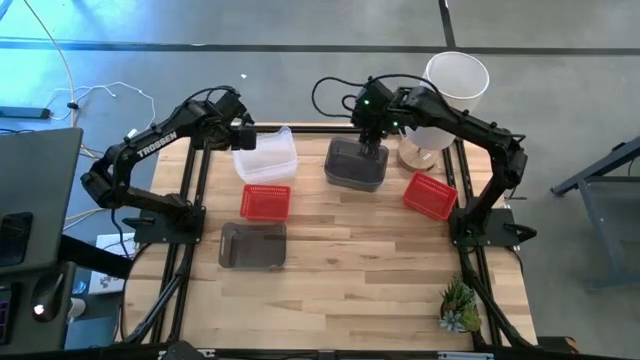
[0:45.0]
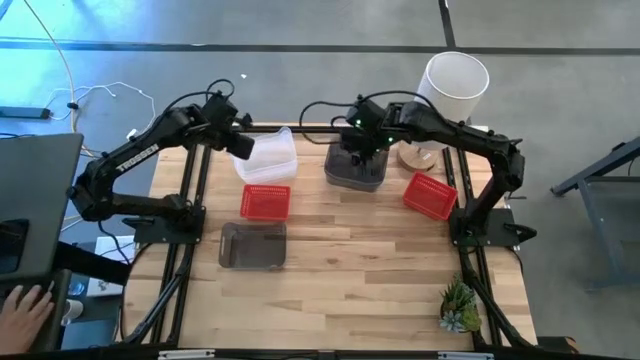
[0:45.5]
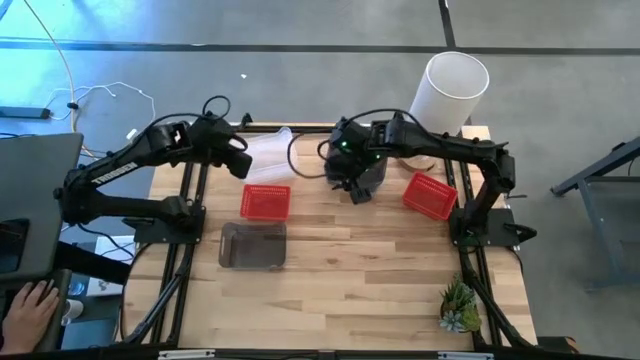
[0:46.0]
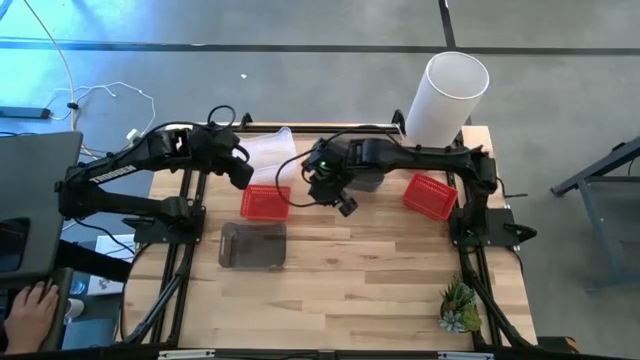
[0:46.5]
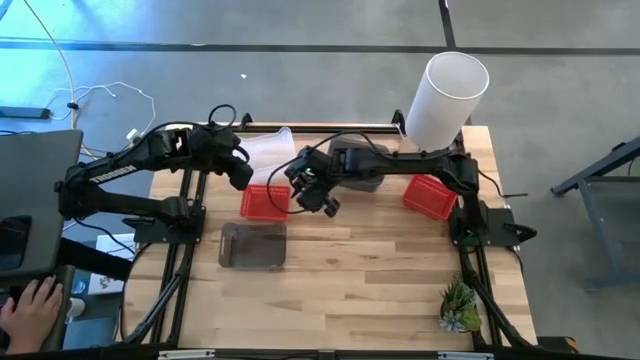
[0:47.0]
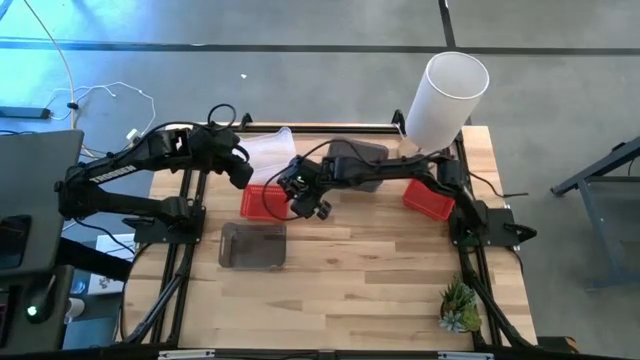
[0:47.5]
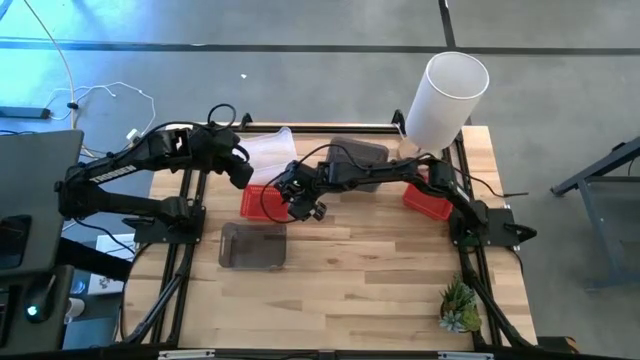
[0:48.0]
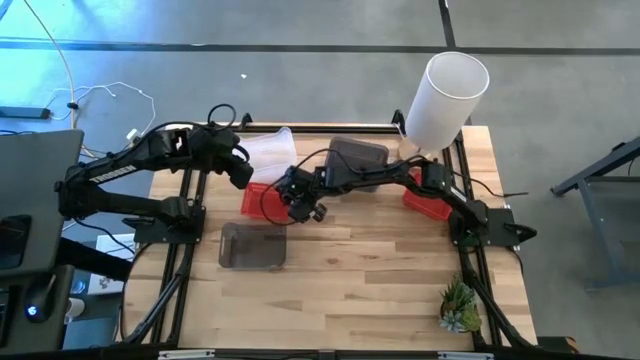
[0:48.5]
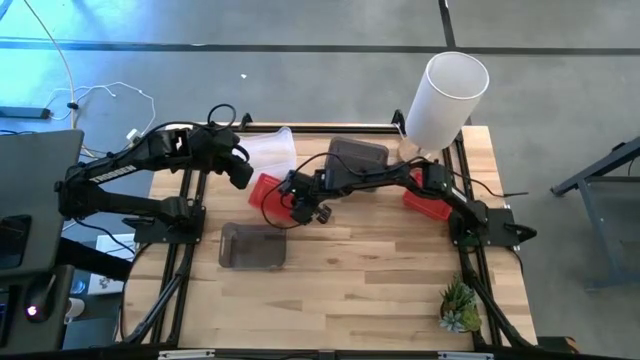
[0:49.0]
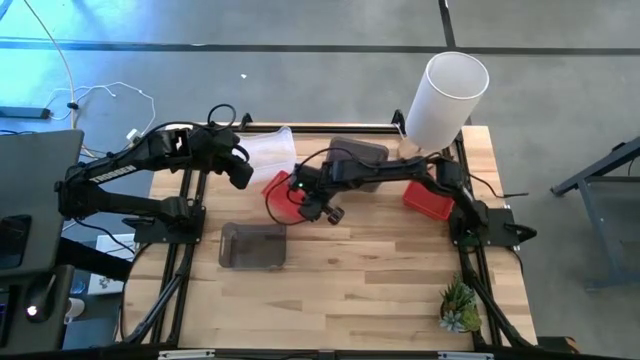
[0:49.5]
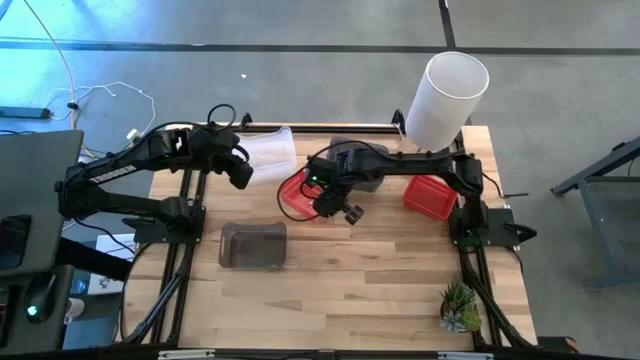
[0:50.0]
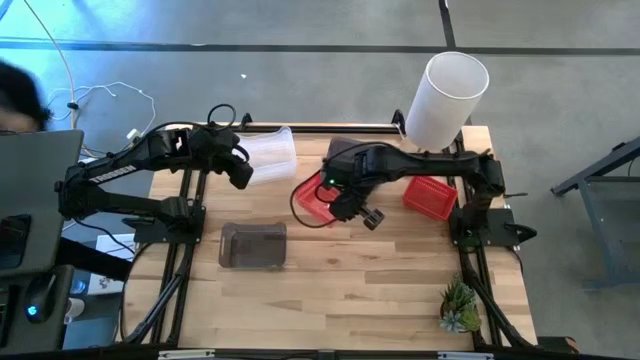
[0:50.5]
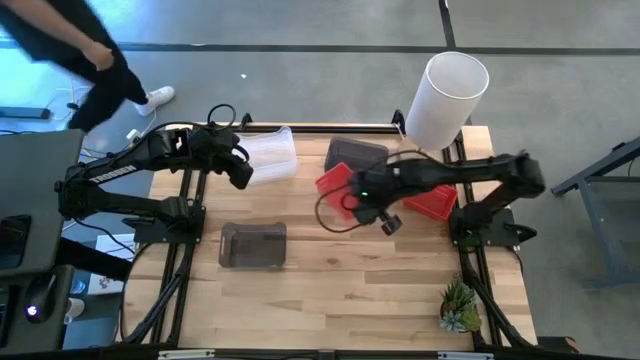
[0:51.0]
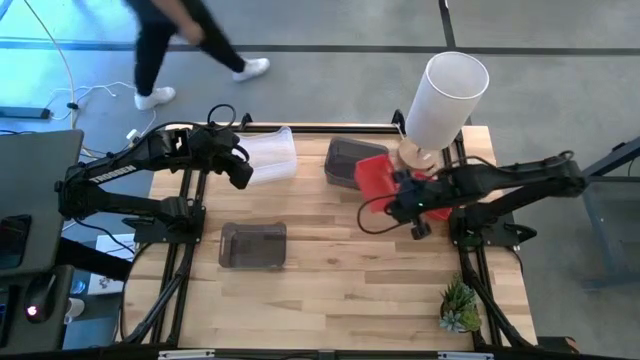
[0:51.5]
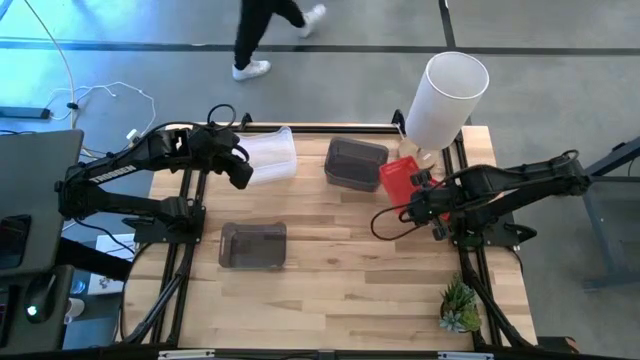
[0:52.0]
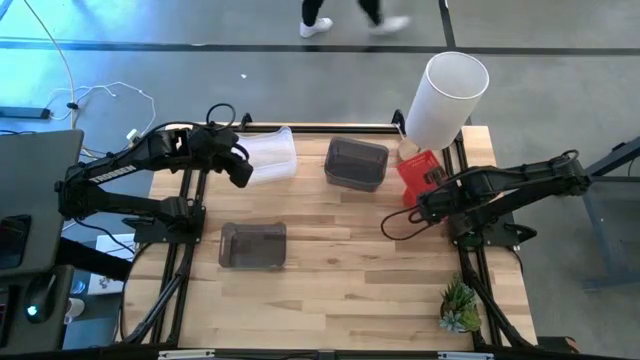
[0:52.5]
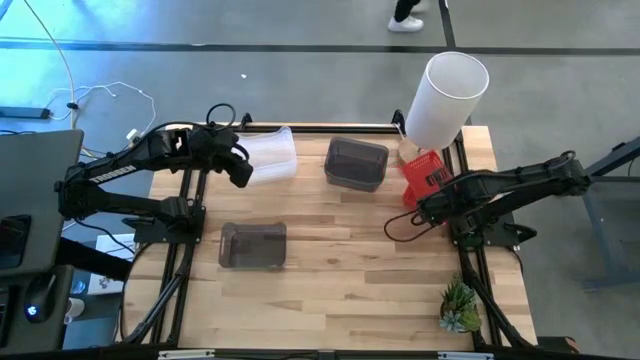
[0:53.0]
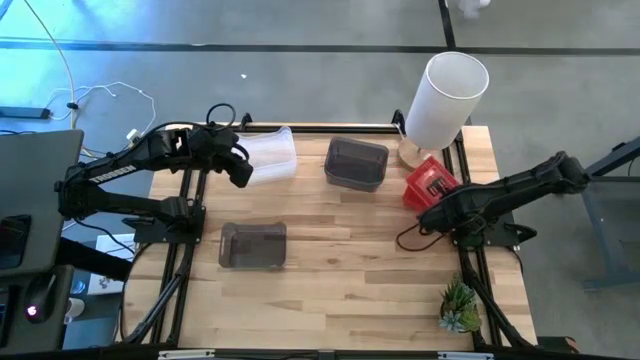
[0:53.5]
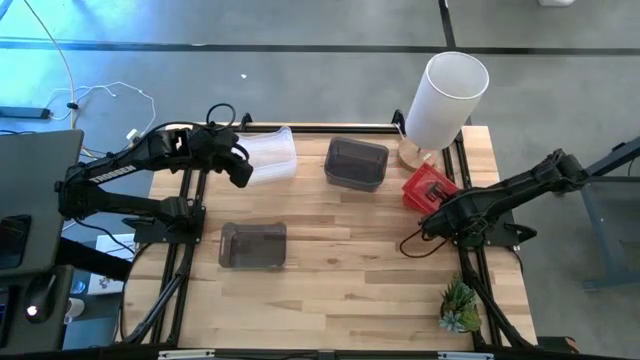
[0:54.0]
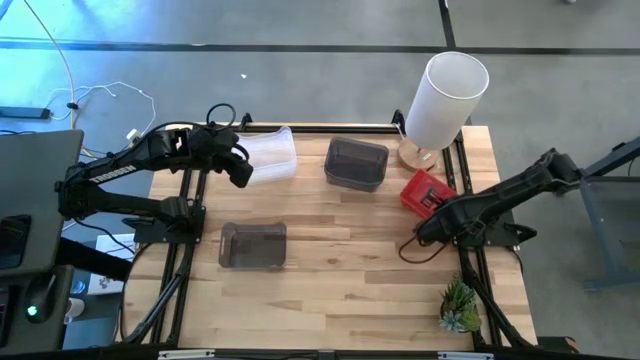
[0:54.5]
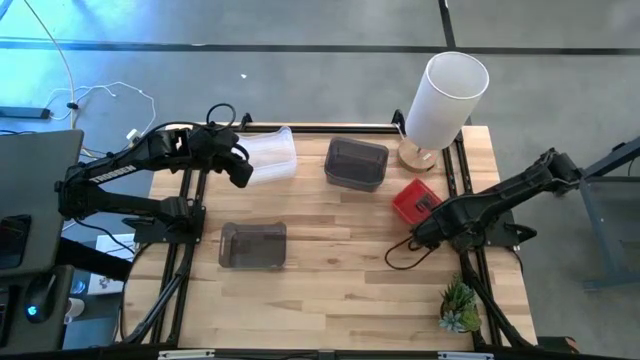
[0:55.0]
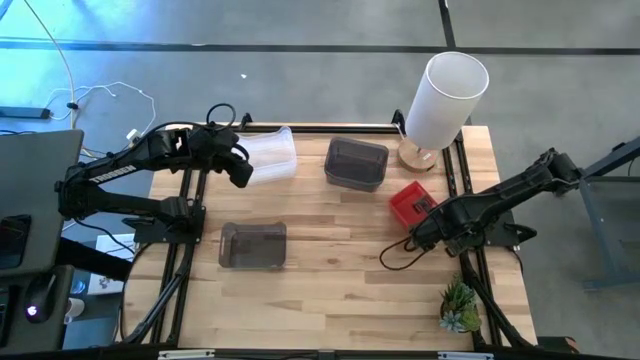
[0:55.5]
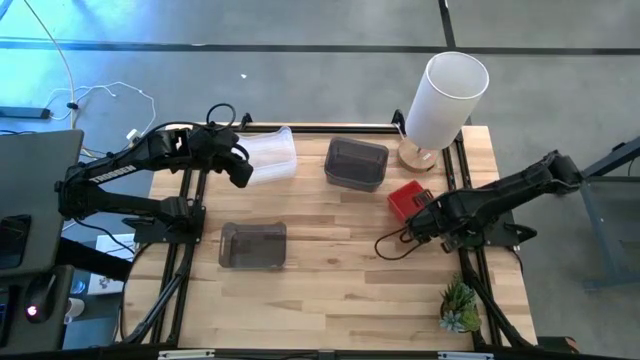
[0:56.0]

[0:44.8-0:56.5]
Stack the left red bin on the right red bin
